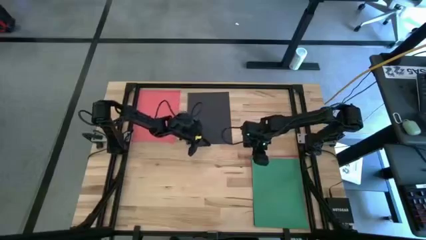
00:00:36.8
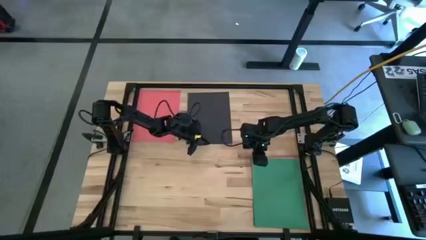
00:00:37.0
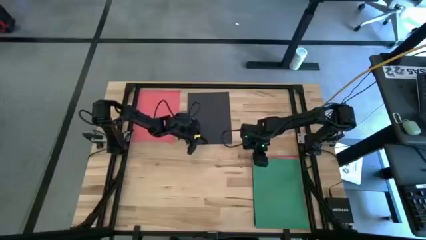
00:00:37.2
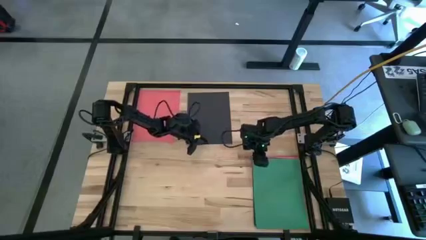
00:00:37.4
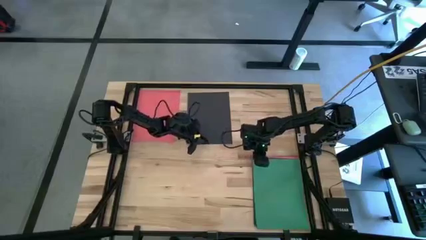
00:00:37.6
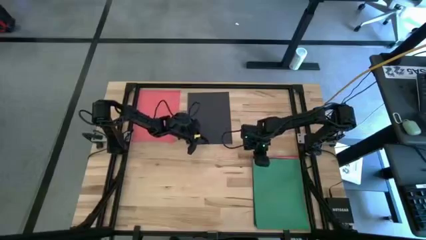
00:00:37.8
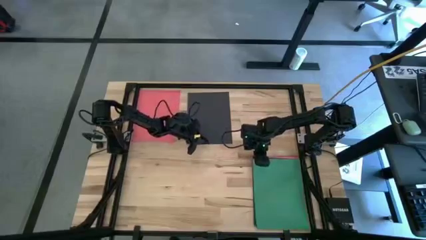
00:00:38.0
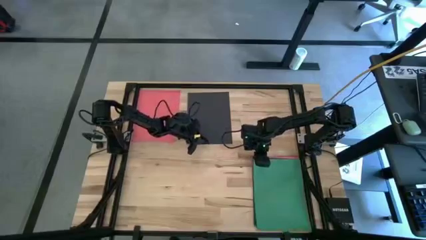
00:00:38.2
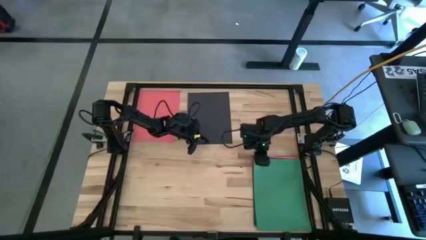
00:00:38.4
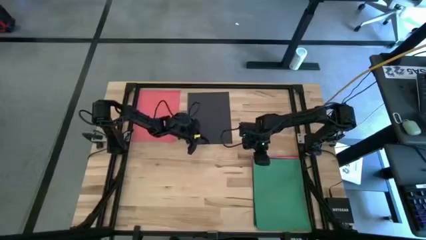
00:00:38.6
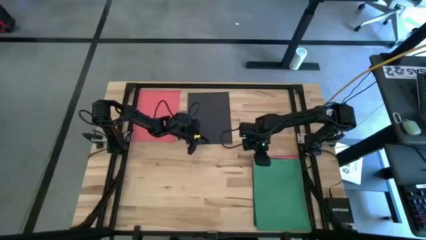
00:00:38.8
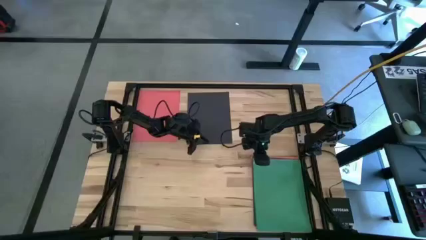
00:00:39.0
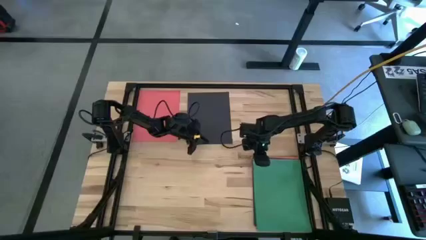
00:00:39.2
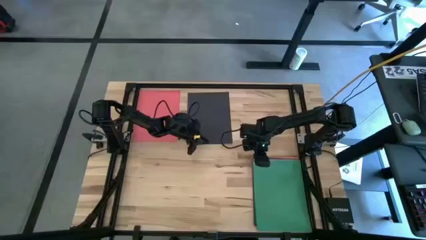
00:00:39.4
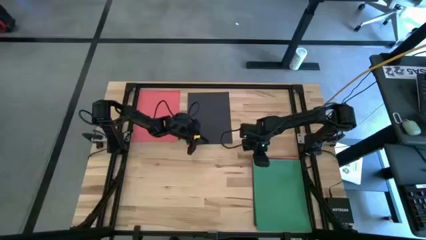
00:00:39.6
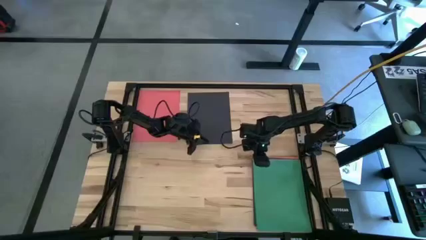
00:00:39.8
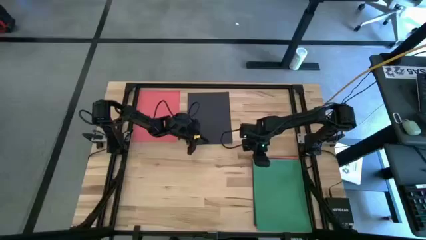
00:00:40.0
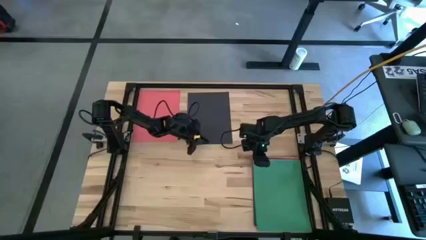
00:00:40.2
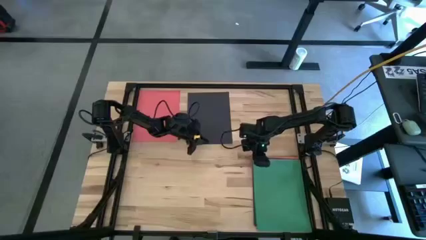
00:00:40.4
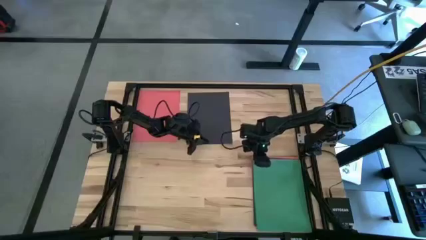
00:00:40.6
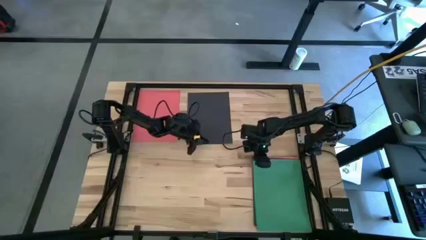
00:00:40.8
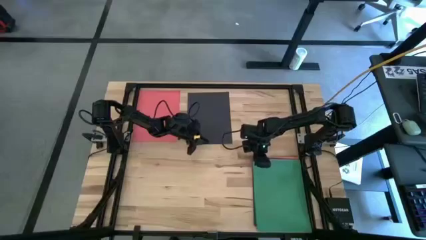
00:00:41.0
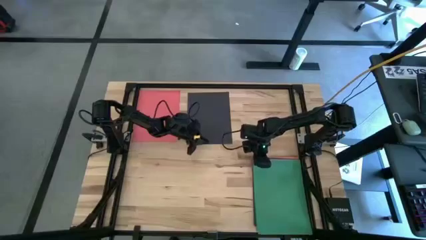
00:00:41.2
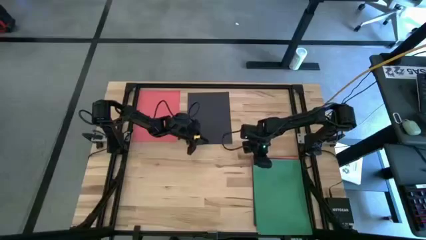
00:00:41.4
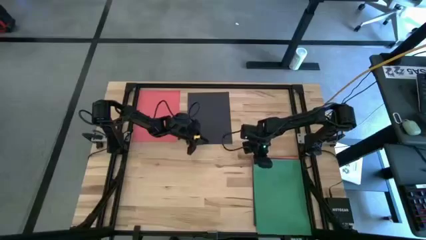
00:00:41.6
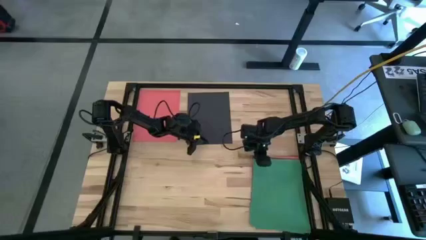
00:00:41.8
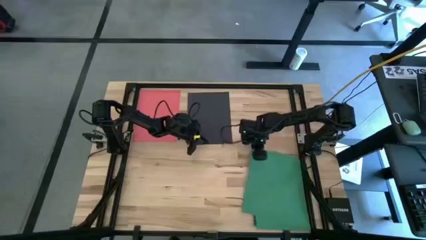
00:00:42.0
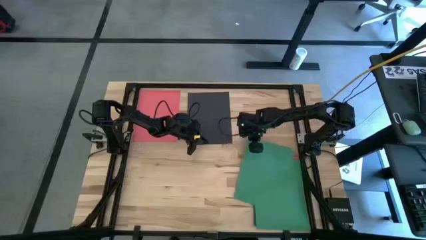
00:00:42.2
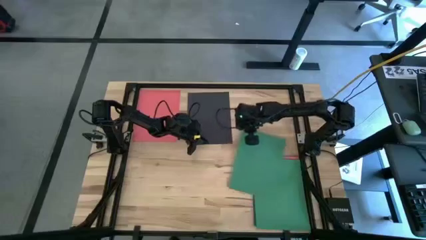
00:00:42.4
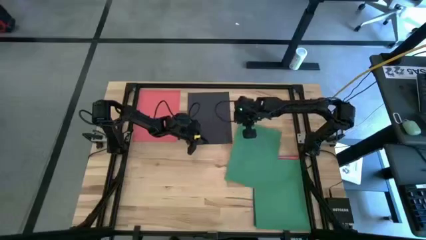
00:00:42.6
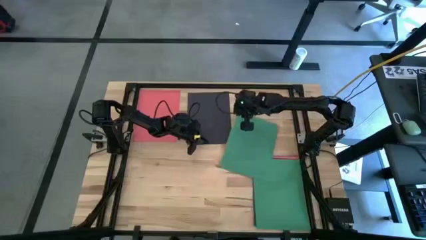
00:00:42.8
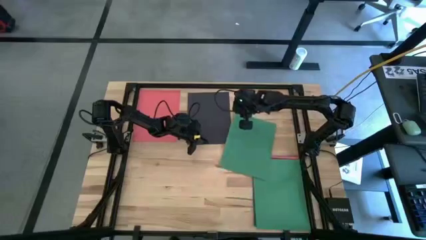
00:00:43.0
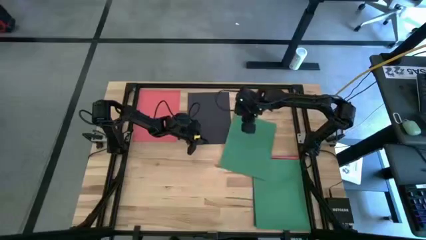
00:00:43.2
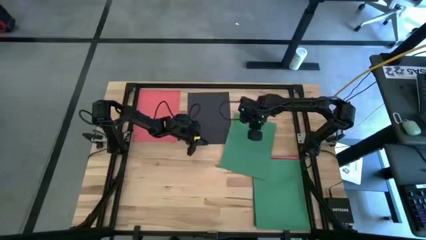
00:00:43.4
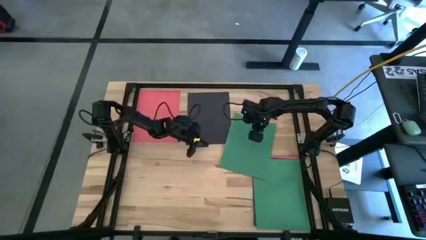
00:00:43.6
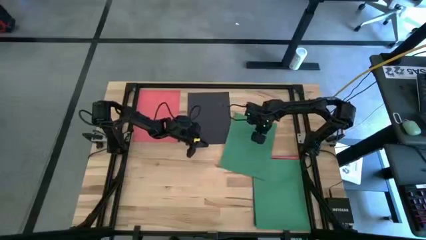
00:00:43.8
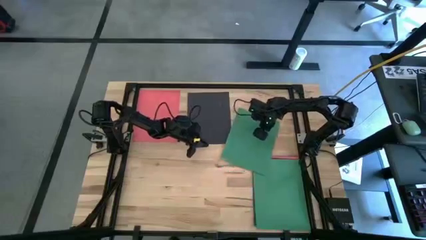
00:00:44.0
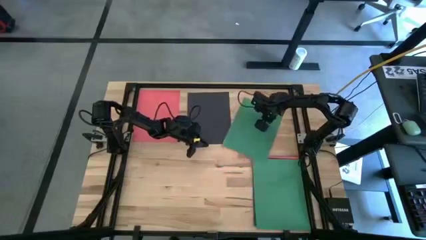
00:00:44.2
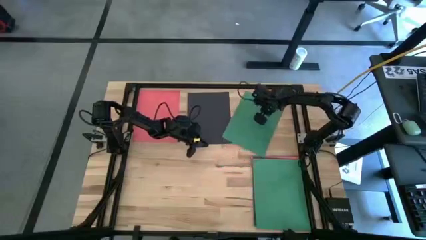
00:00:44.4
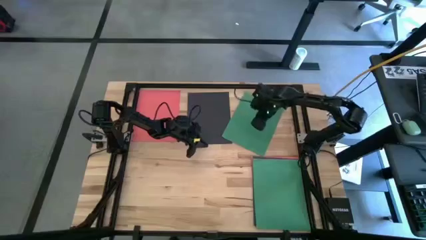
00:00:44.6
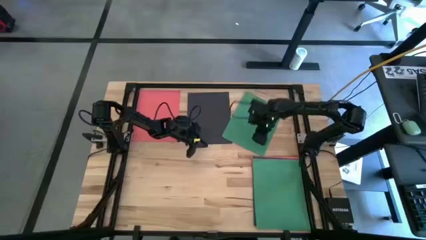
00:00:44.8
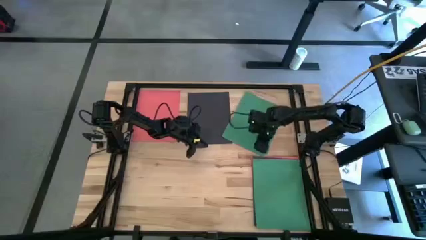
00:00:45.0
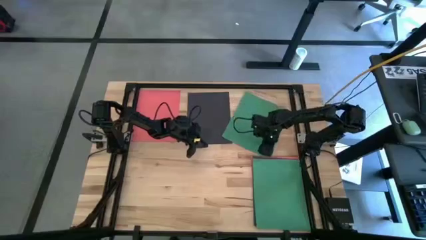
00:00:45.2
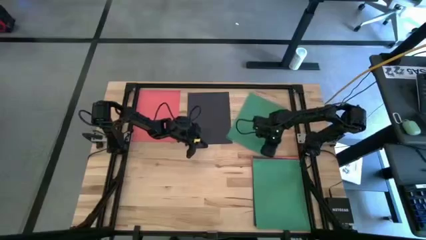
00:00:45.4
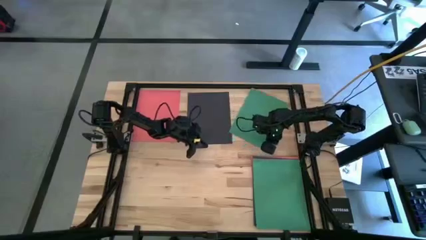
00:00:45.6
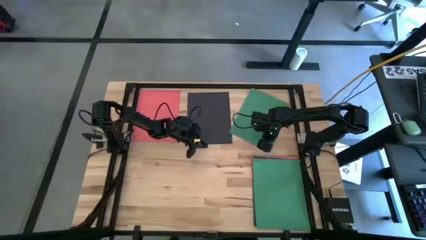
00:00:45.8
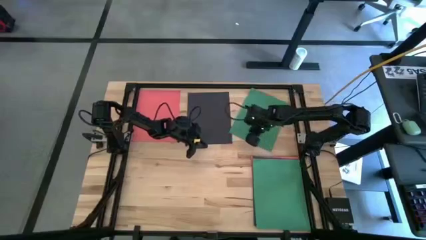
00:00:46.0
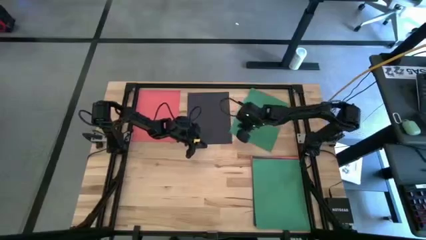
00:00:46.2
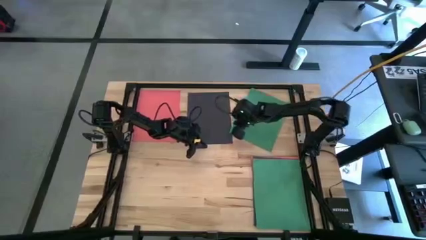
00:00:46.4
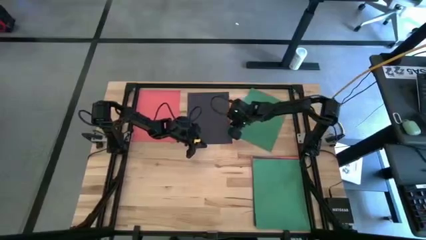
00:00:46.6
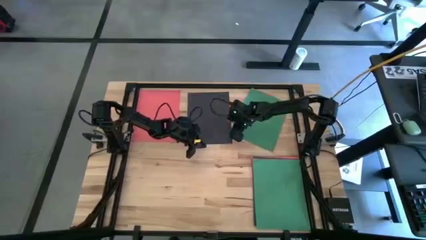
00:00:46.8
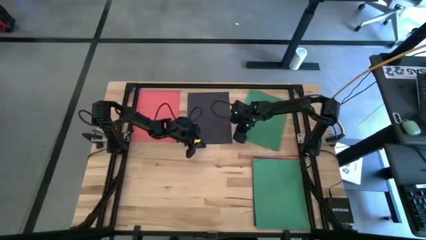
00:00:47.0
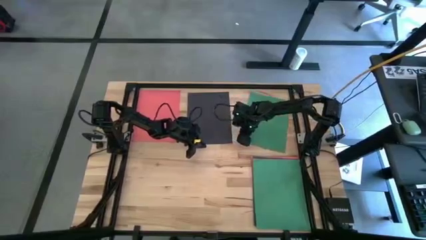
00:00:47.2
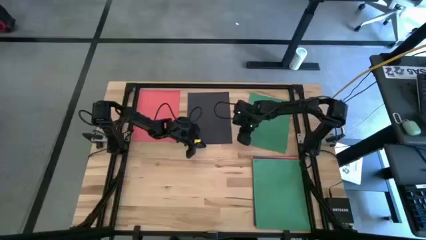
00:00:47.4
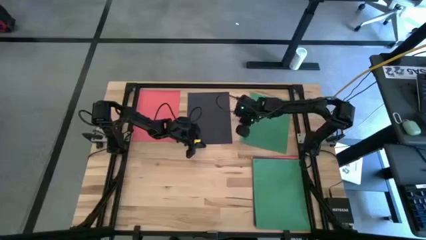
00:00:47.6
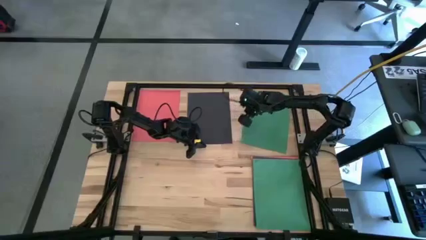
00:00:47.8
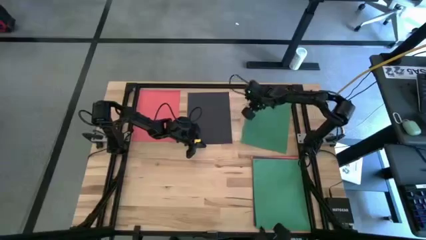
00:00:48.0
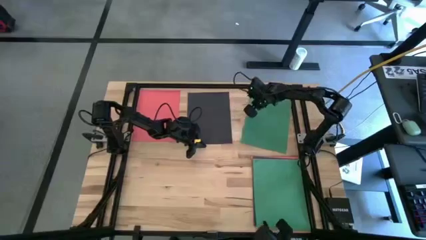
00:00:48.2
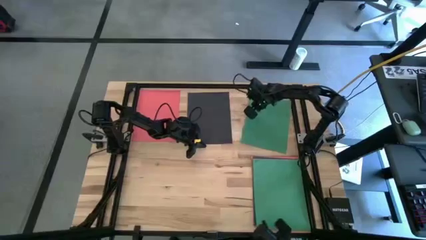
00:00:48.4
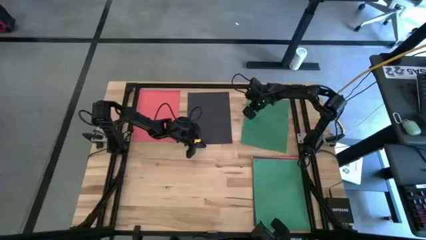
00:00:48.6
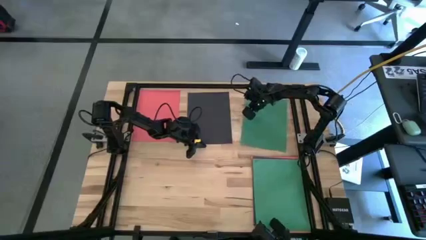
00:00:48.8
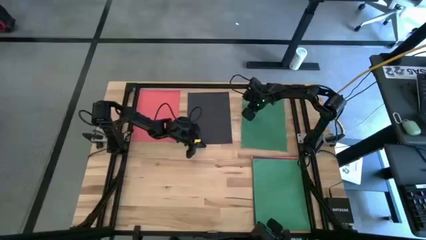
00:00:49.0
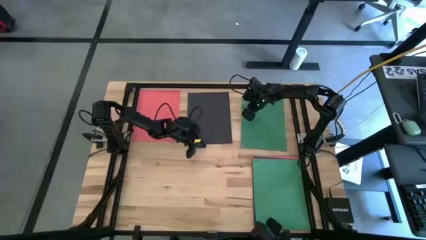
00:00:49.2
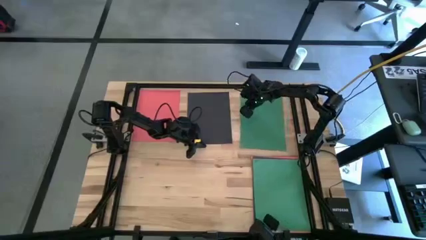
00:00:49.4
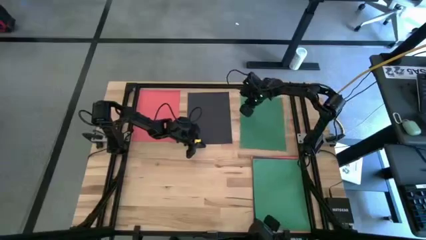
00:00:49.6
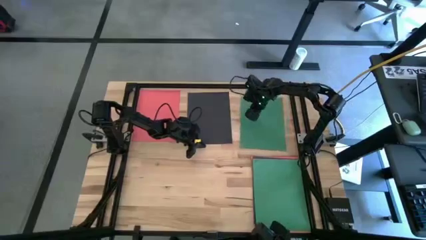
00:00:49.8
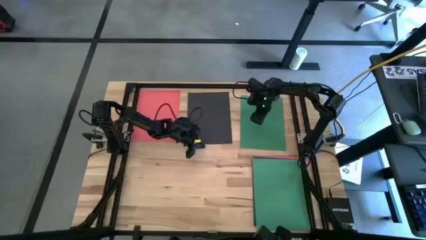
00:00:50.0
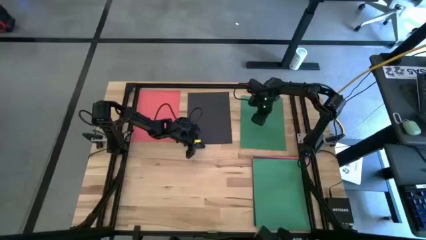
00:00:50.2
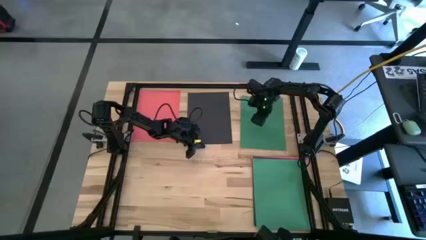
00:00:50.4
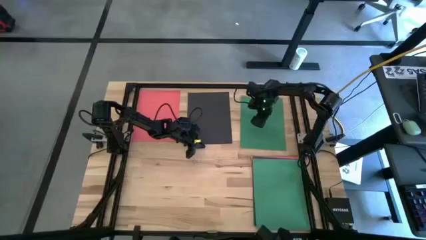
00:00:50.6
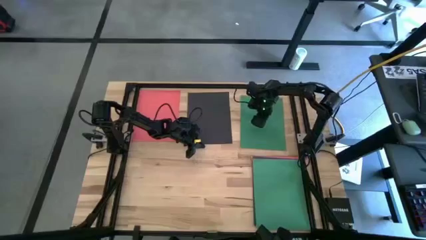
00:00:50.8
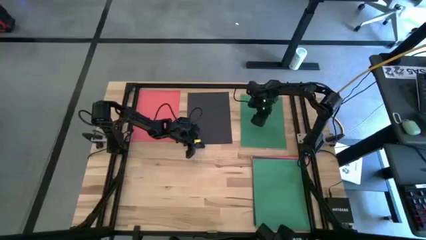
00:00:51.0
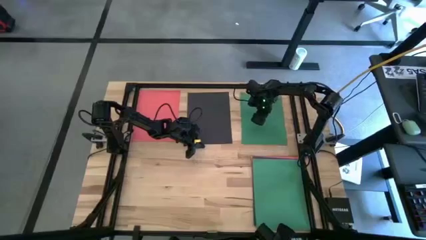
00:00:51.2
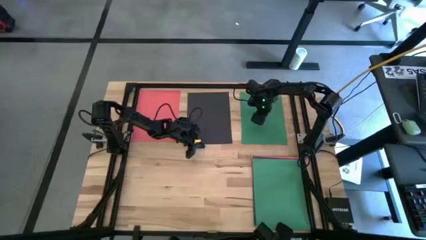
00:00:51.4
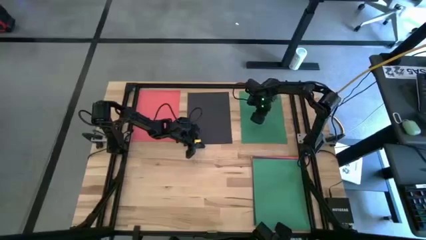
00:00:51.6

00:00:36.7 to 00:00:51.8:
Task: Organize paper
Move the green paper to the top right of the table

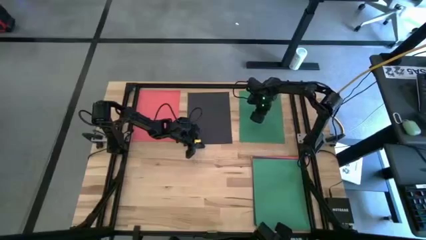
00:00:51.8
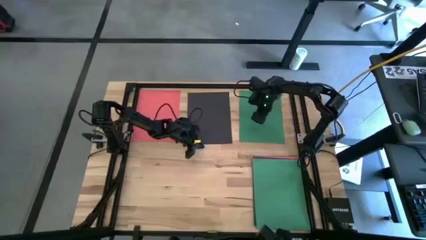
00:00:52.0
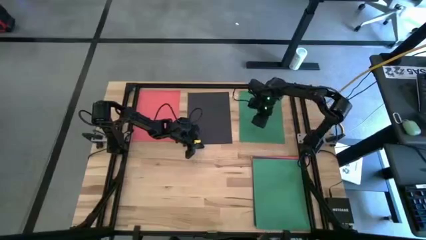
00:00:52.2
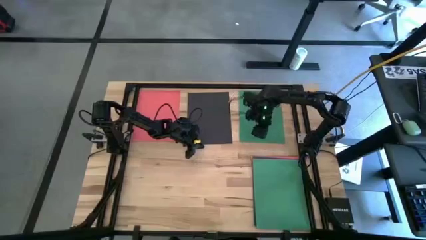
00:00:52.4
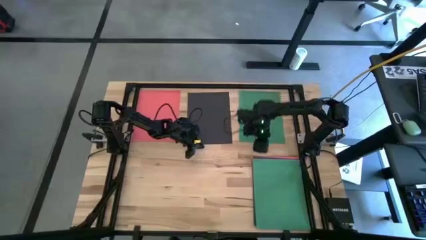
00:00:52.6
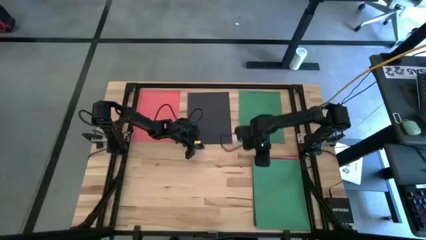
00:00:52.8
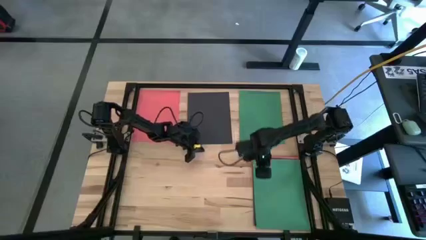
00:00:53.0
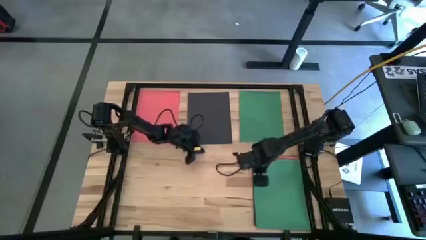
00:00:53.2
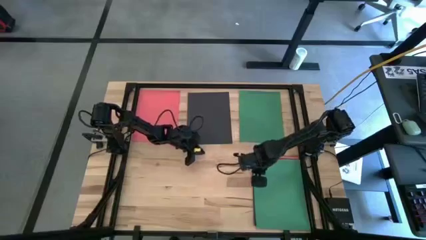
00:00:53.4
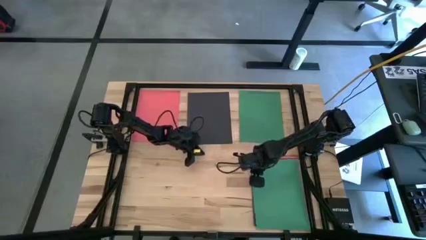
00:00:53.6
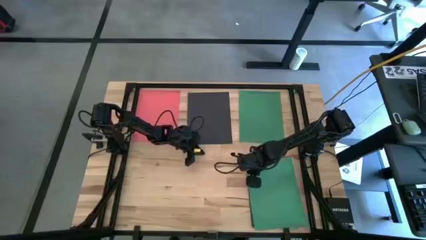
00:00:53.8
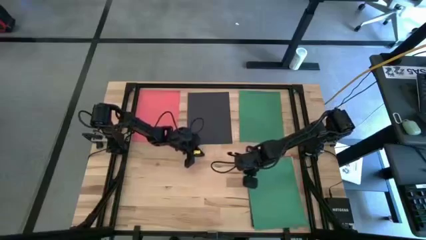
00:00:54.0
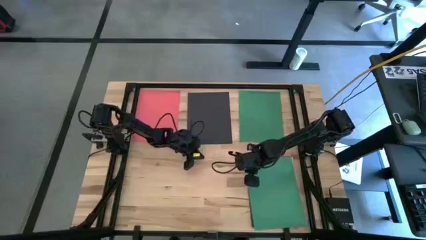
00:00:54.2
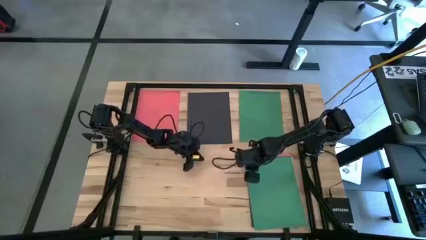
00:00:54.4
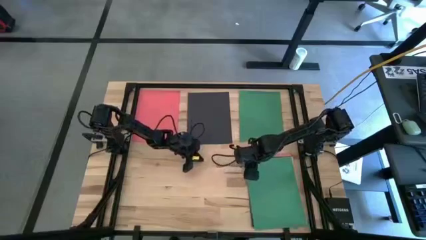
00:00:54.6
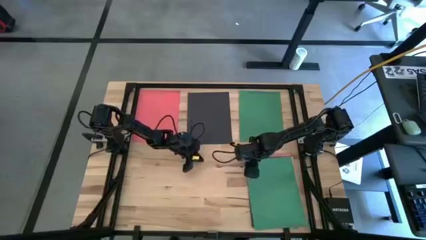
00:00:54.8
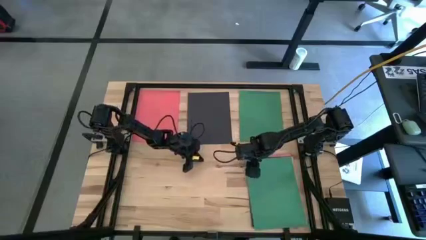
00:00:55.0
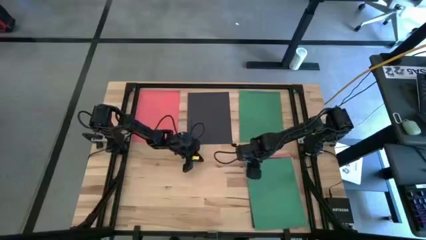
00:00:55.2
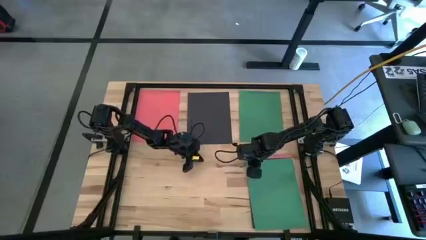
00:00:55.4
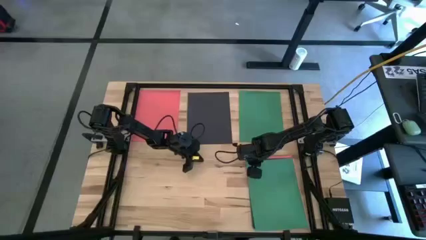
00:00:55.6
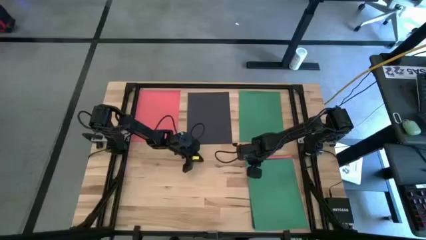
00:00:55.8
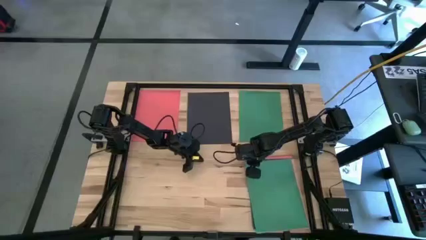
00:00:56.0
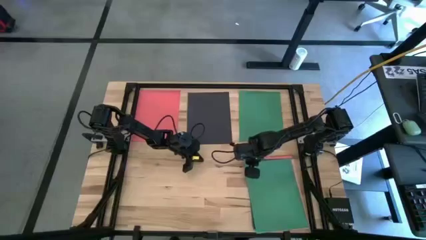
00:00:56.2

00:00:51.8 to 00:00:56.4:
Stack the green paper on the green paper at the top right of the table
